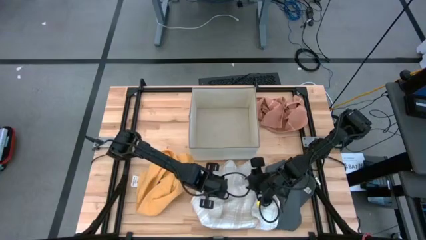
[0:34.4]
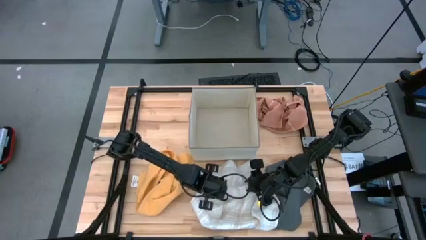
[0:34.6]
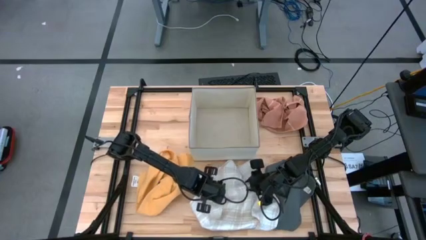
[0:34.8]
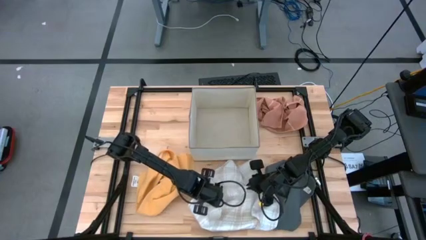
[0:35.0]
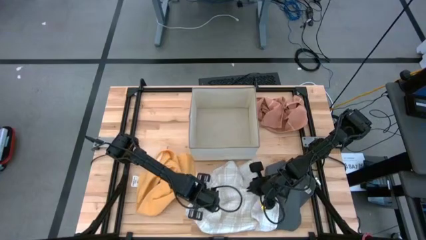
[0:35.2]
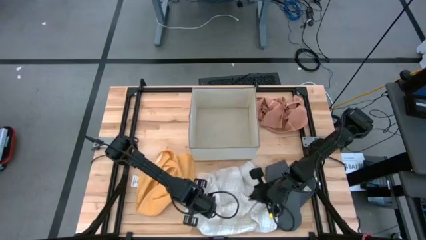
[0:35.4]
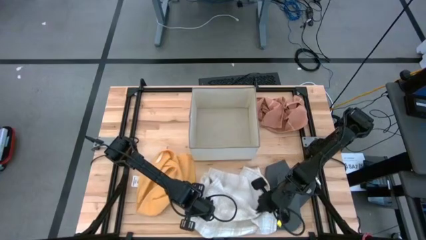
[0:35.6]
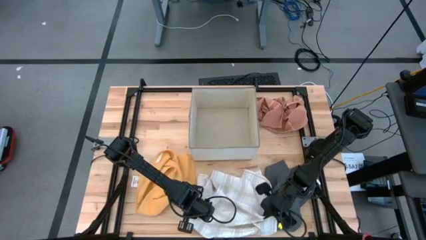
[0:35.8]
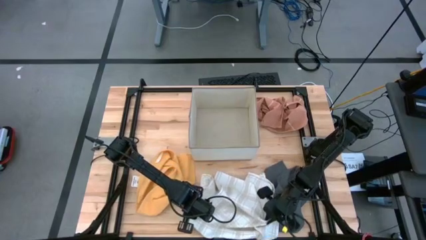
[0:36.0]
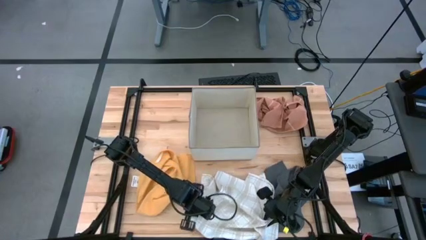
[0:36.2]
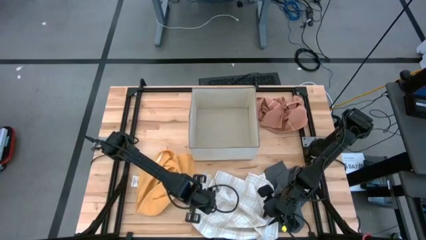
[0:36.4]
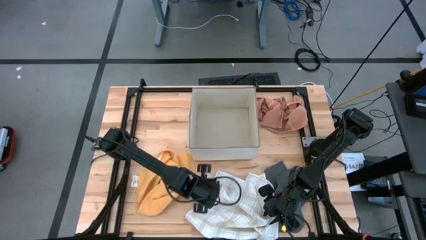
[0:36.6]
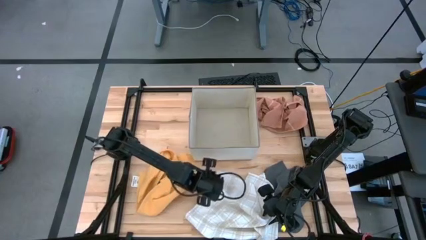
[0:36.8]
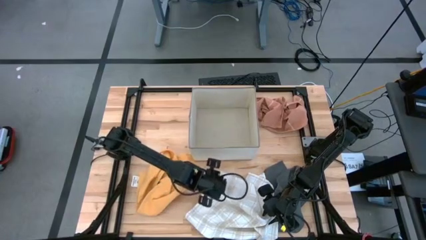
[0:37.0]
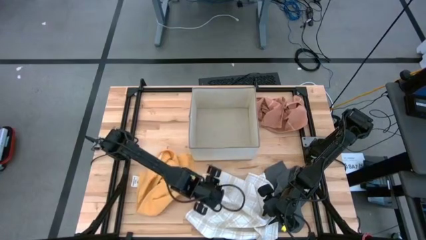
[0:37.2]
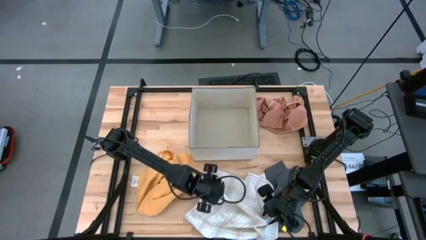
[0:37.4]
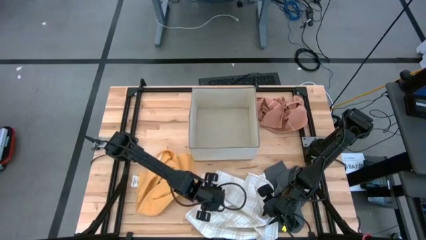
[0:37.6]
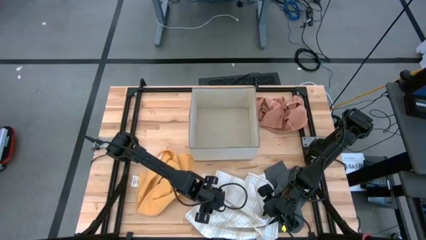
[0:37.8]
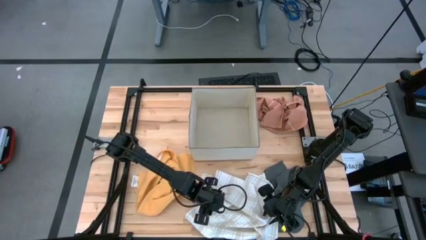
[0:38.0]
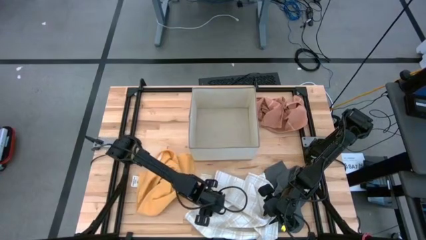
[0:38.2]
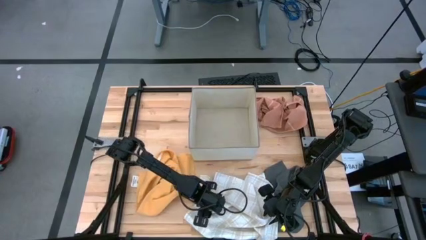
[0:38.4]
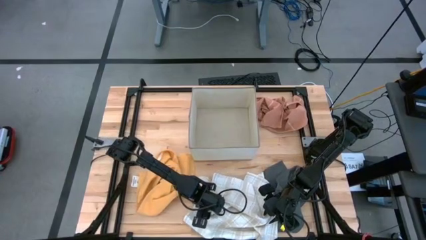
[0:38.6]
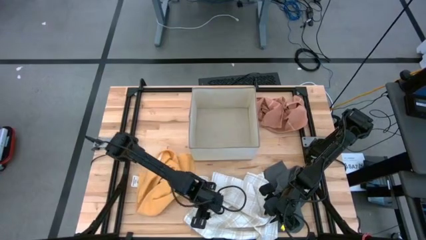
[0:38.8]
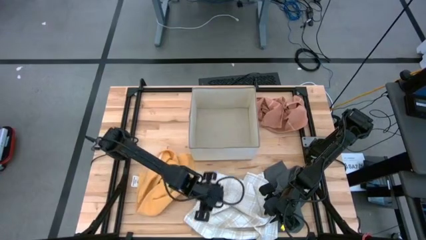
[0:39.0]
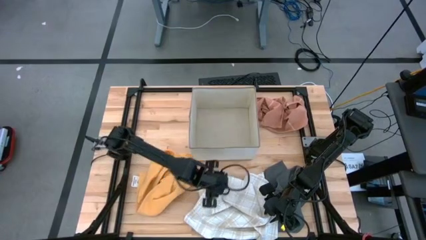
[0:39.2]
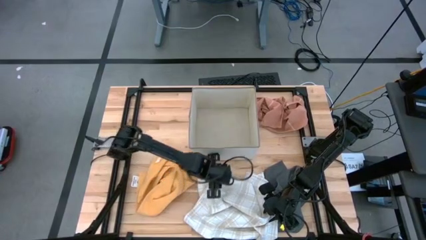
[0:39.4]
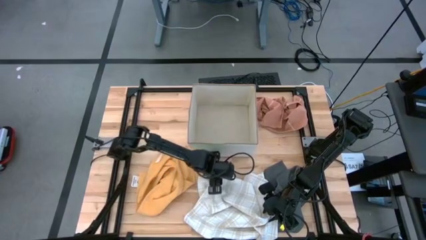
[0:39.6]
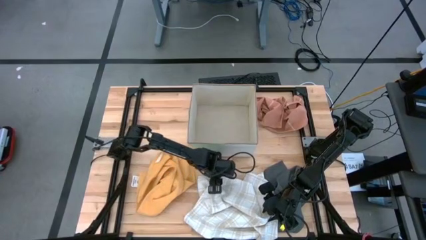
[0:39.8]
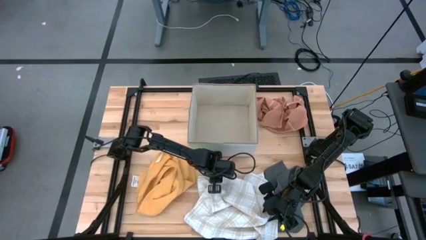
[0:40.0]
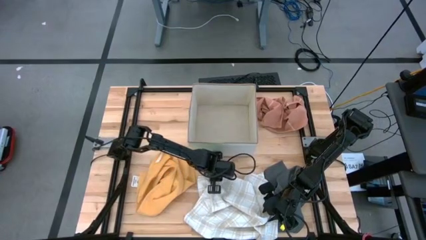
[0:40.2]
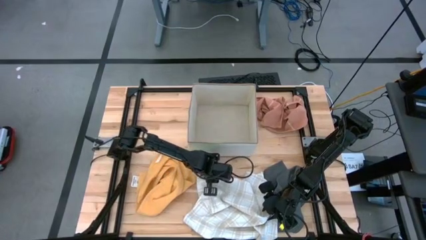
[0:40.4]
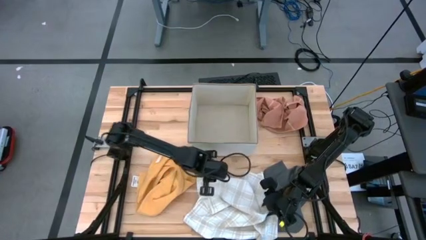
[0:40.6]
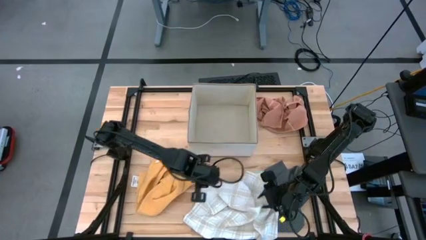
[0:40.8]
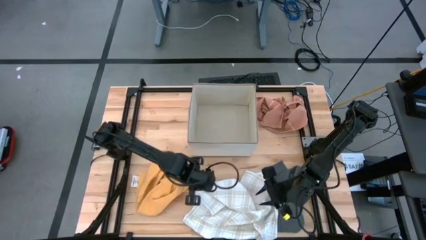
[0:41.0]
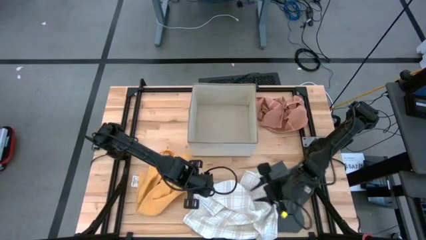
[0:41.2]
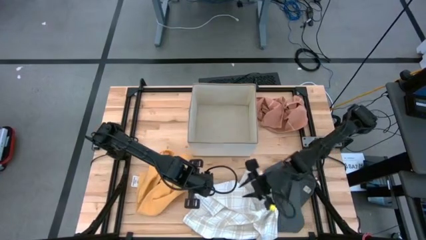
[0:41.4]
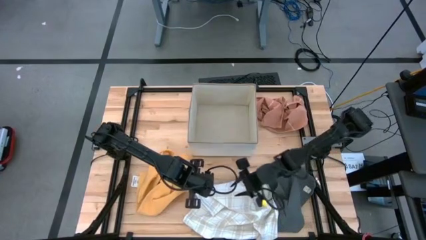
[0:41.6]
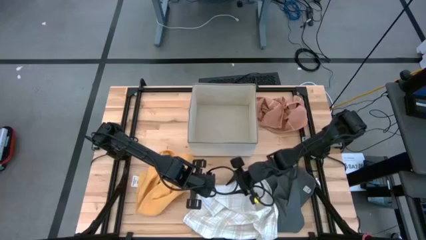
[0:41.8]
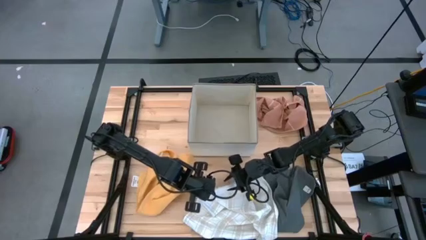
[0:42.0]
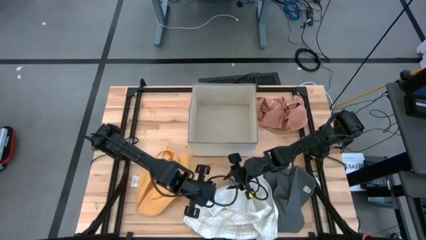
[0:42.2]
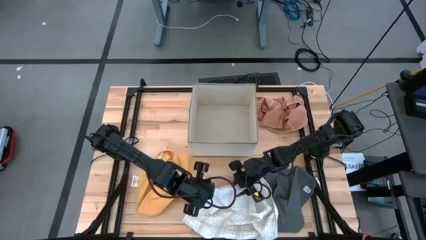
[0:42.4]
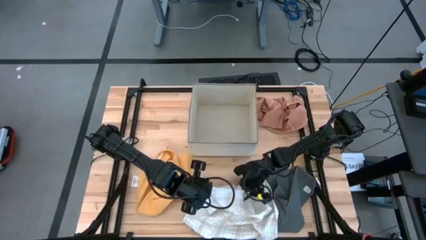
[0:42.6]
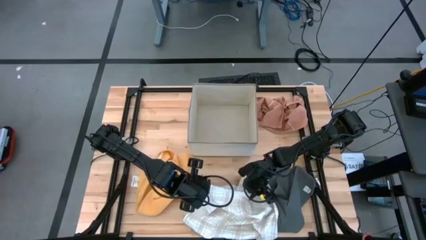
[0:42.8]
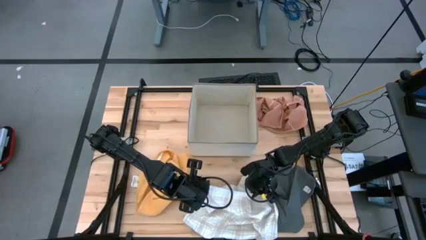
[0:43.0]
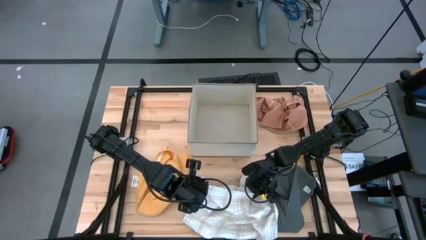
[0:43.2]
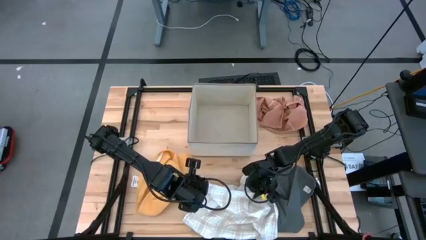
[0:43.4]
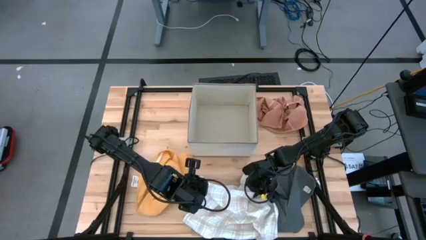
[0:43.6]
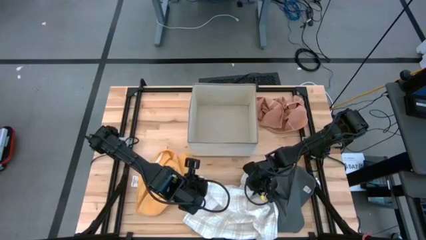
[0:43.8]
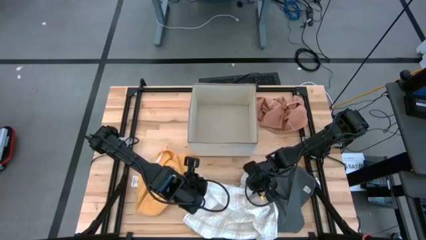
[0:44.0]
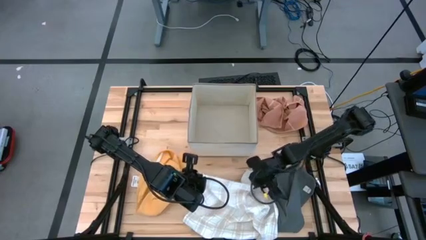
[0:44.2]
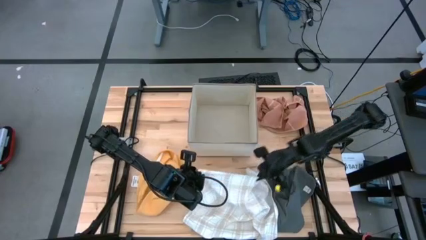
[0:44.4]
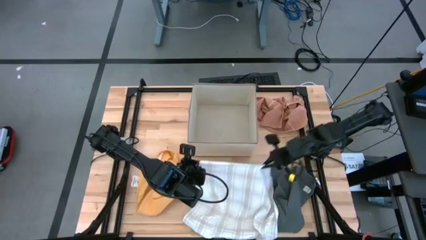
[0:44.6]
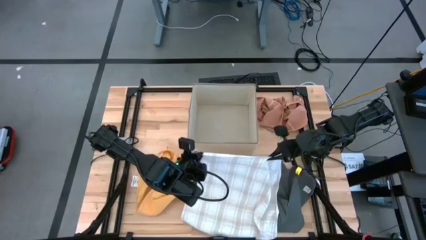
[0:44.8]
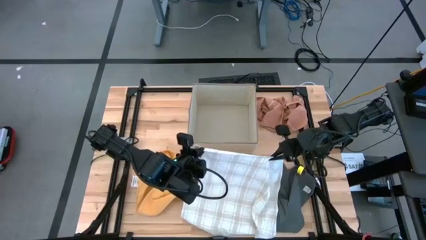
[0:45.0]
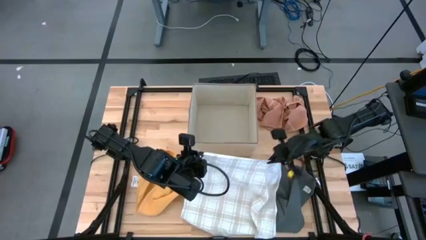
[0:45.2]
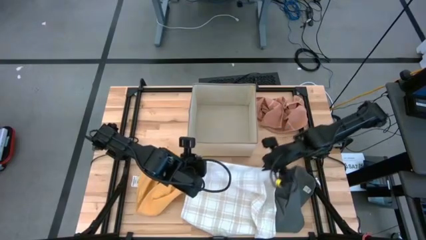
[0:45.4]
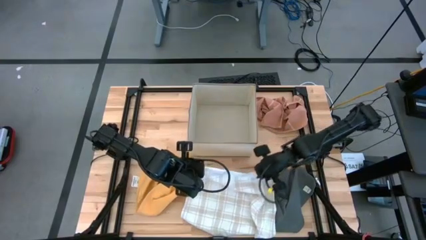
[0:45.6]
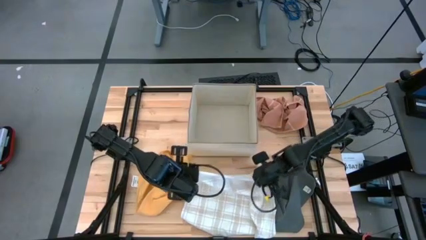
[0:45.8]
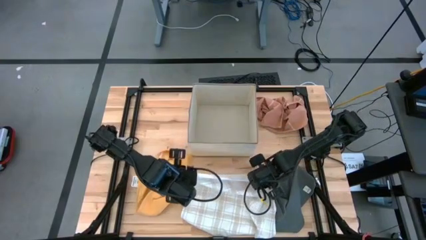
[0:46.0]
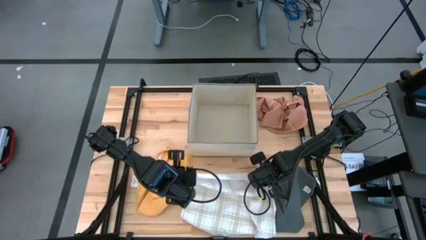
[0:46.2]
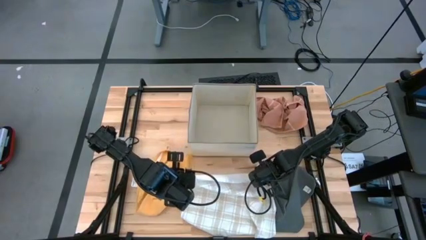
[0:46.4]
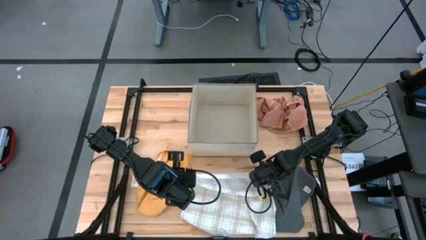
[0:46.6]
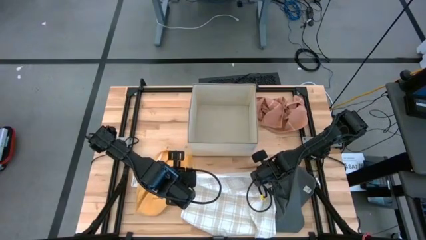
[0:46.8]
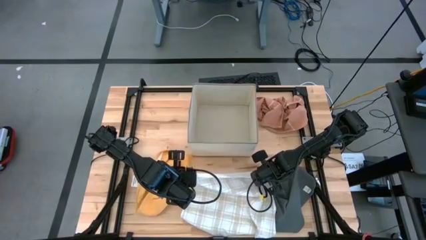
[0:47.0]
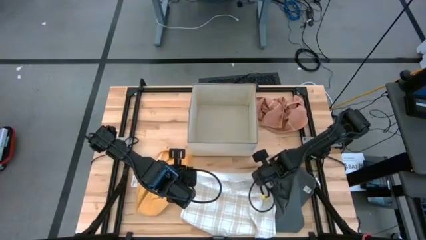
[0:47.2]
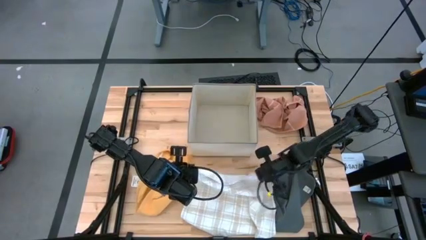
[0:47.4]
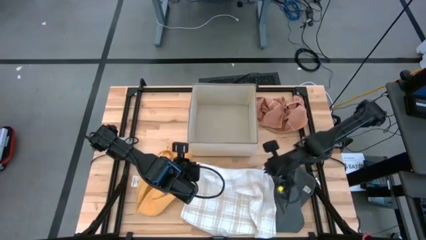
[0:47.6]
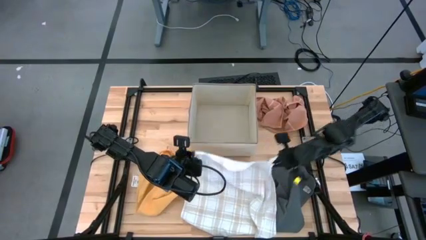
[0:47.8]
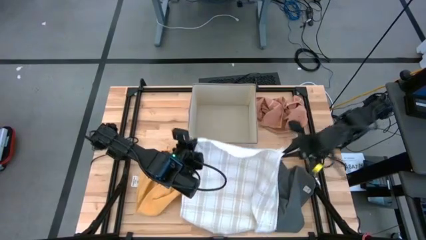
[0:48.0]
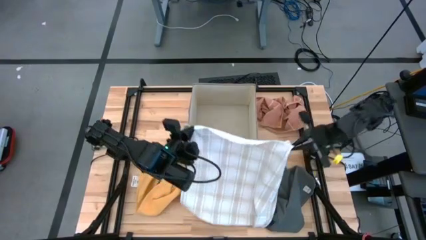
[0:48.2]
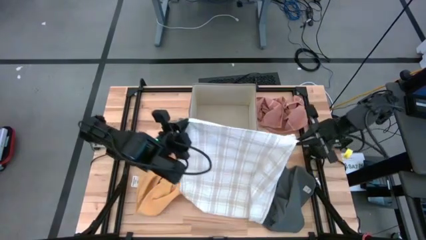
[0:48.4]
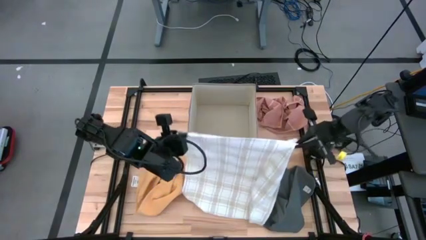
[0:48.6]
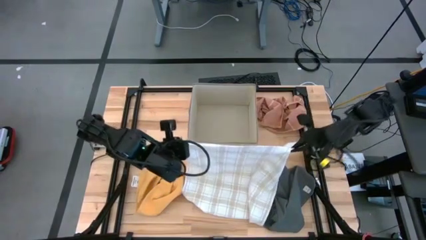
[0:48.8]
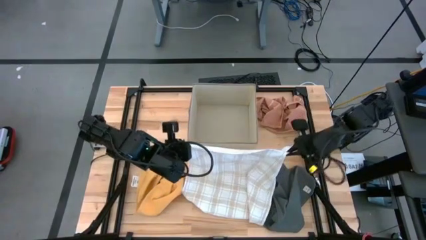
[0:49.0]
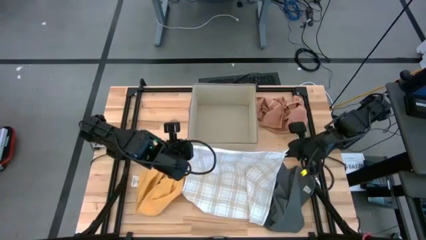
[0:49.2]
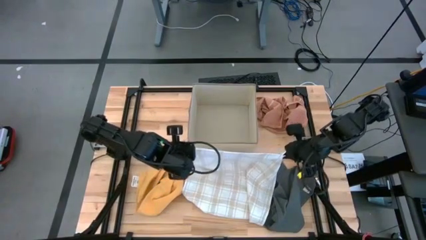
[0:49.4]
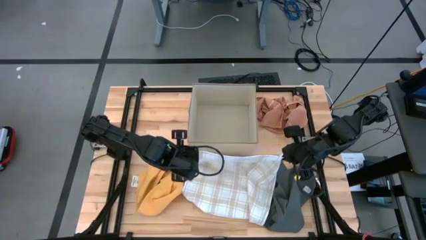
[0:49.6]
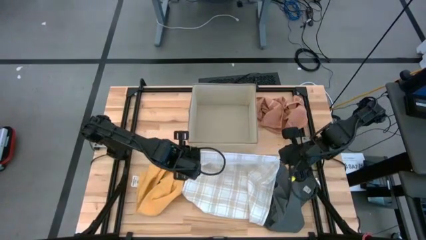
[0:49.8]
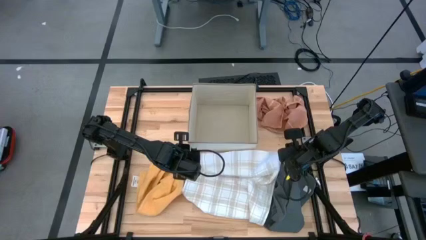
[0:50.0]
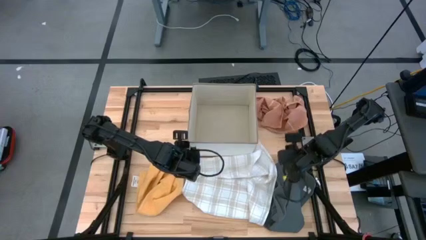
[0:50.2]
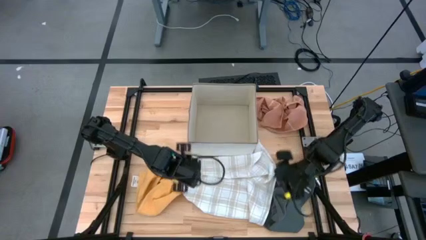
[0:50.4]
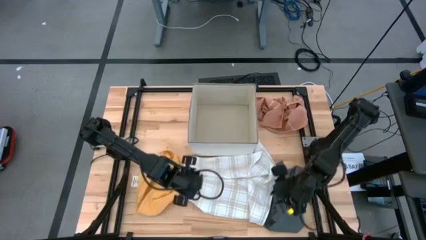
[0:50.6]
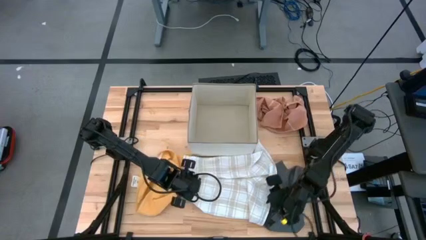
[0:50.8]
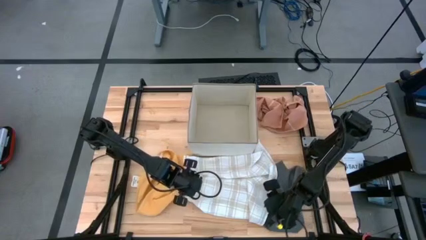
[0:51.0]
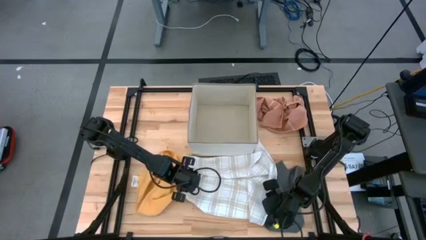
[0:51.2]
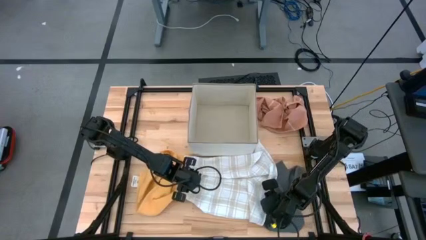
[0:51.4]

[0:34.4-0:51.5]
Task: Fold towel
Fold the white towel with brown checkered lines
